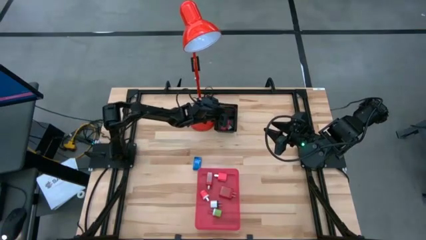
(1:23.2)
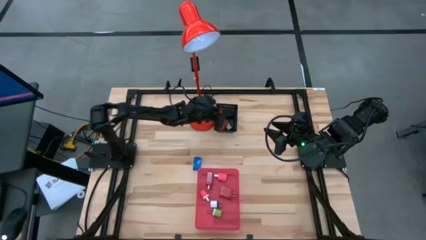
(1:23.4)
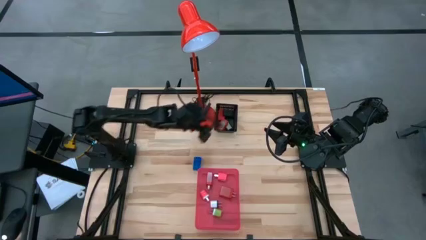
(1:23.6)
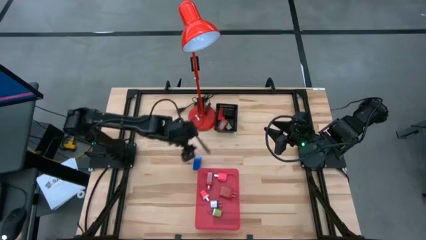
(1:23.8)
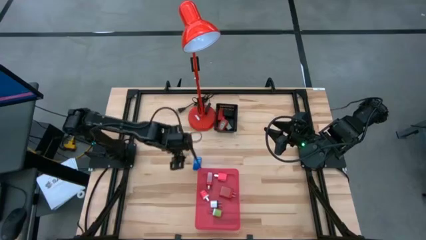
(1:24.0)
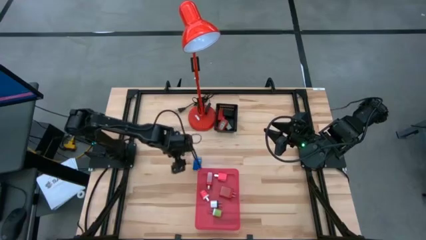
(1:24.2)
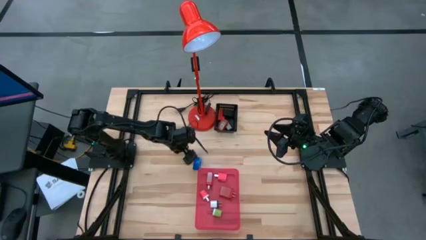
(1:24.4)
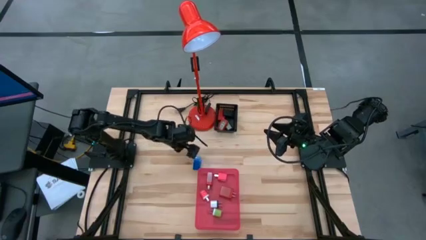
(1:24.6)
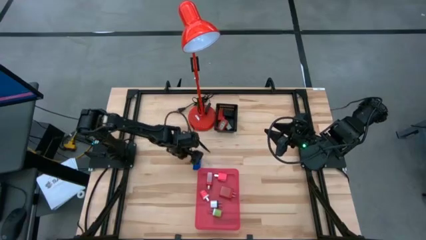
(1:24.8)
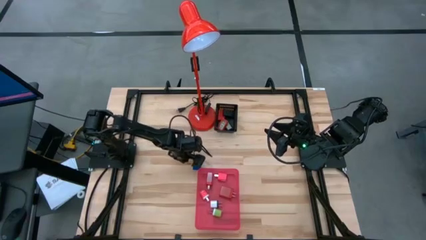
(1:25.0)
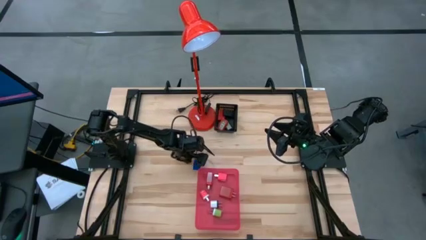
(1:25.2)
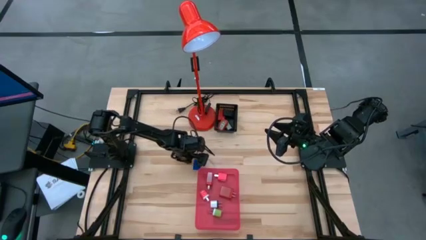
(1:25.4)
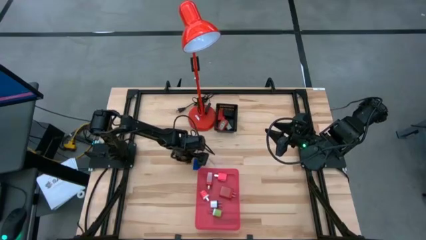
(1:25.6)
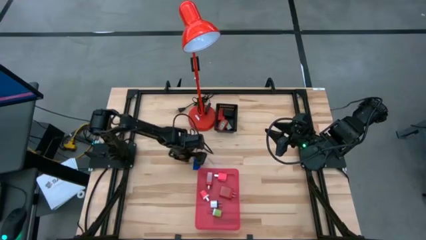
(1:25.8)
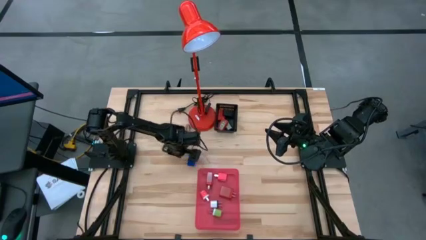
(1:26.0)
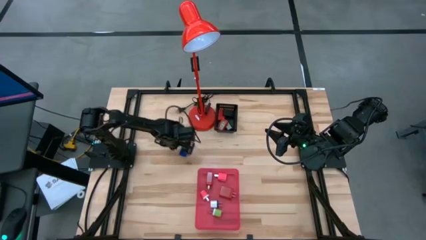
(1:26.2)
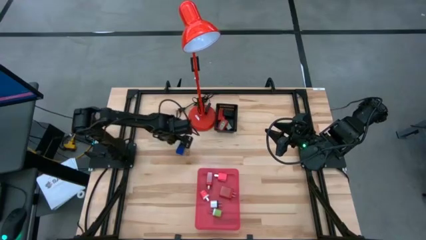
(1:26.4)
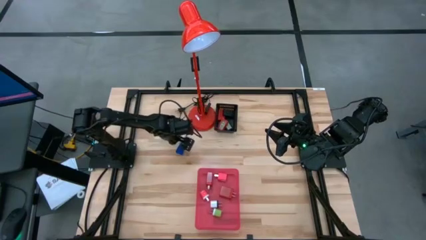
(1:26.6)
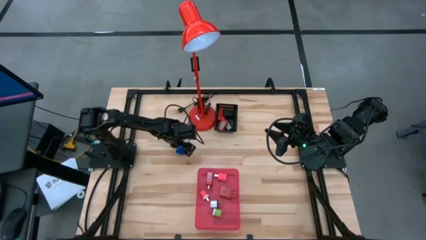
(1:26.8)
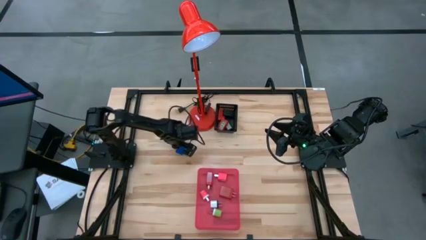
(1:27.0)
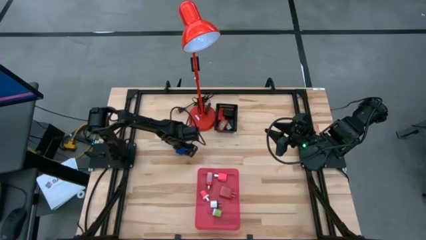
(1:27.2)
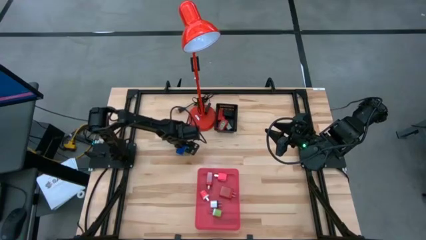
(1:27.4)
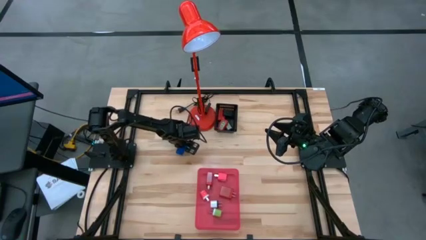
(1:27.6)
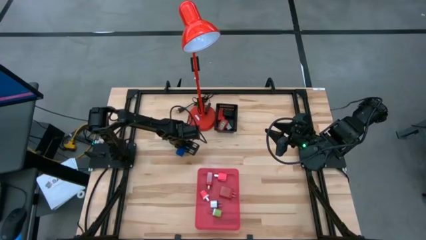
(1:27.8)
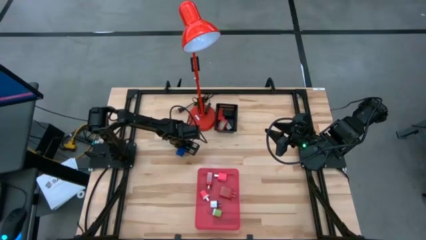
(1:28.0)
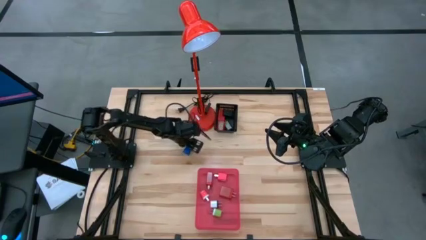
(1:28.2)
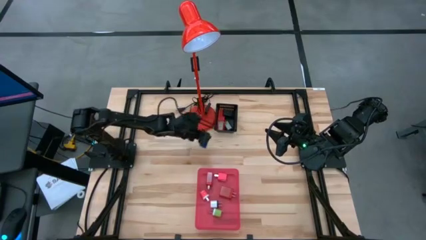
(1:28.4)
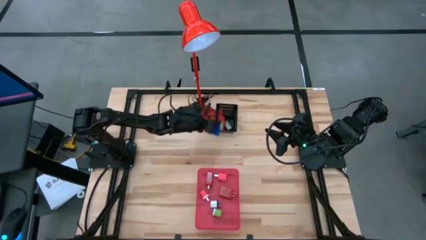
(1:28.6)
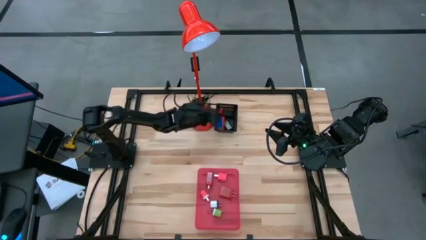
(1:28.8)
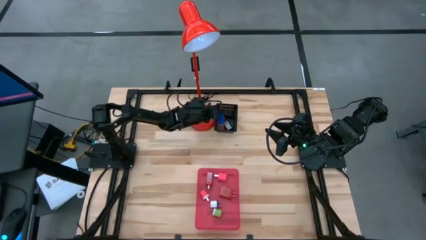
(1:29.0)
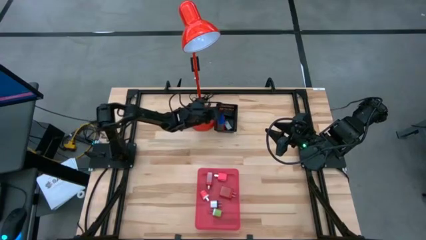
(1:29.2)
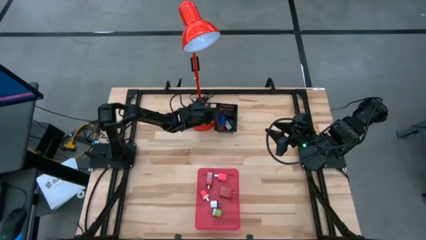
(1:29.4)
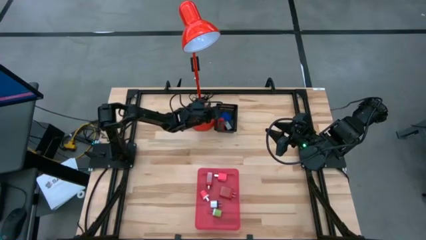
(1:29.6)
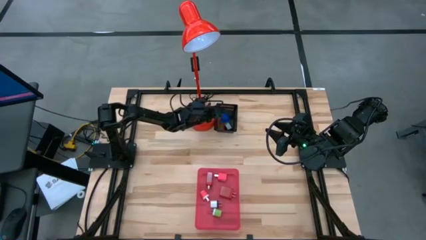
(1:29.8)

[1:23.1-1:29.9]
Task: Pick & Place Office items
Put the blue digital clock into the black bin

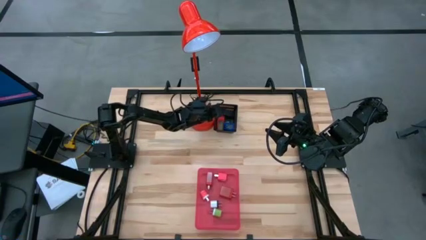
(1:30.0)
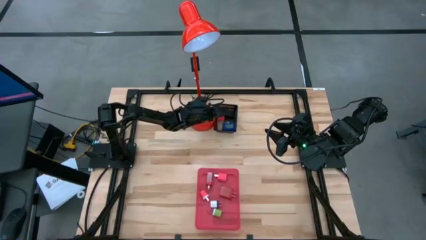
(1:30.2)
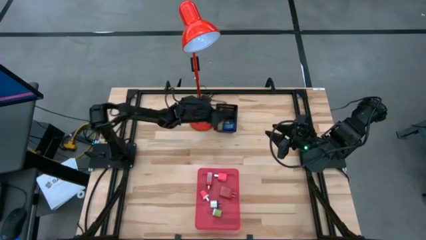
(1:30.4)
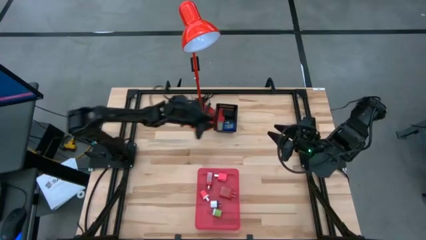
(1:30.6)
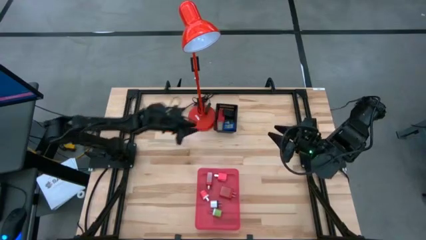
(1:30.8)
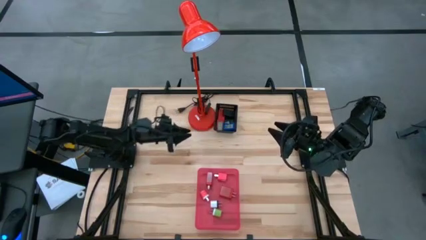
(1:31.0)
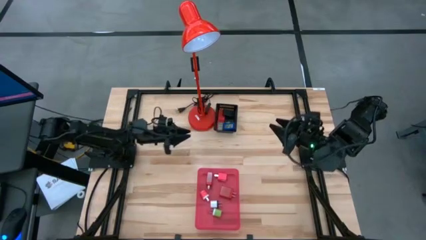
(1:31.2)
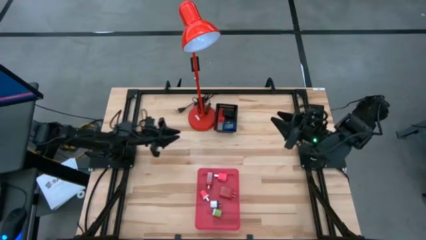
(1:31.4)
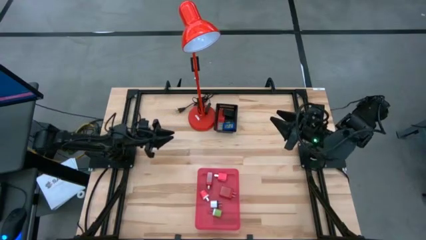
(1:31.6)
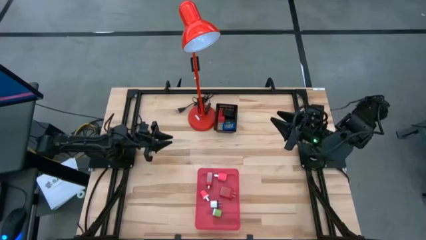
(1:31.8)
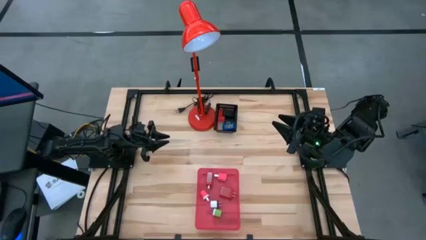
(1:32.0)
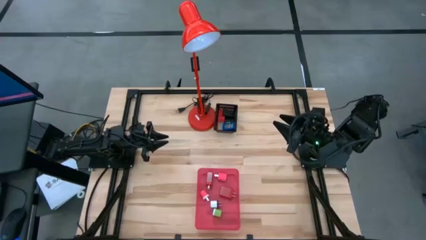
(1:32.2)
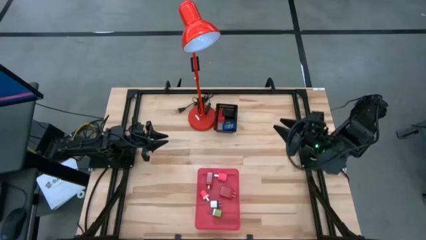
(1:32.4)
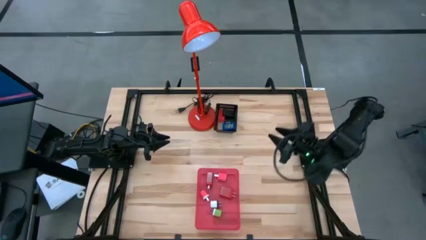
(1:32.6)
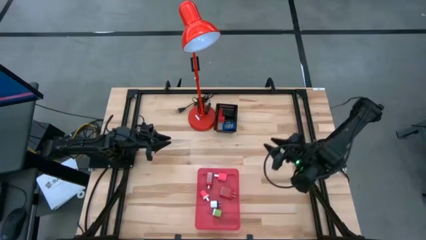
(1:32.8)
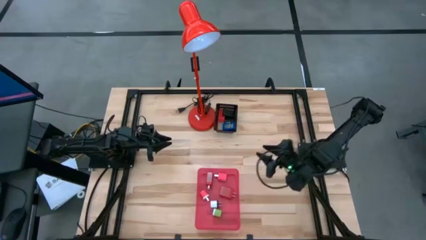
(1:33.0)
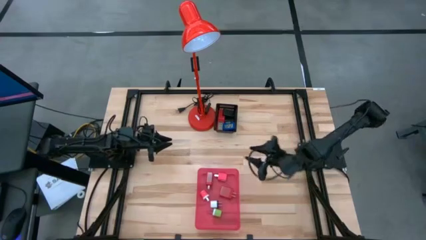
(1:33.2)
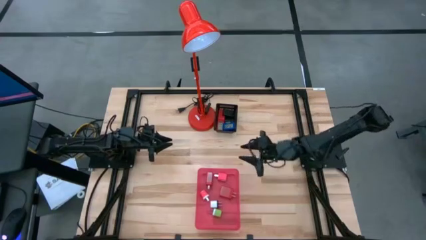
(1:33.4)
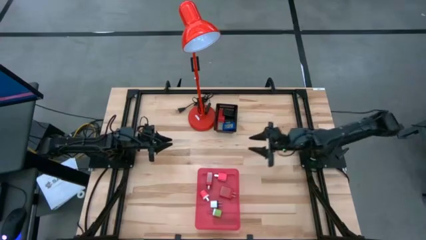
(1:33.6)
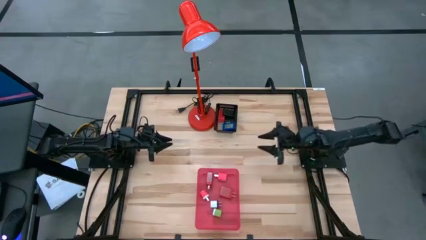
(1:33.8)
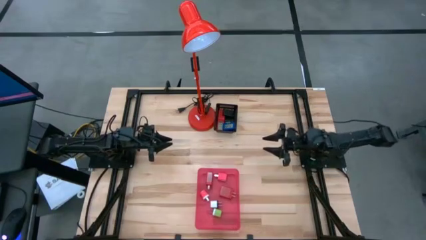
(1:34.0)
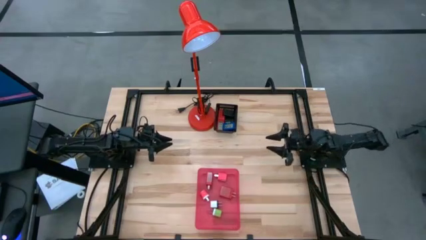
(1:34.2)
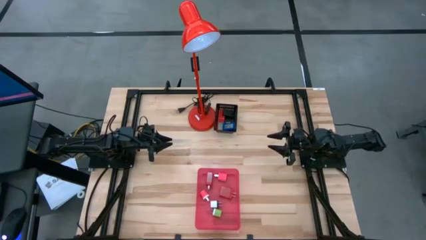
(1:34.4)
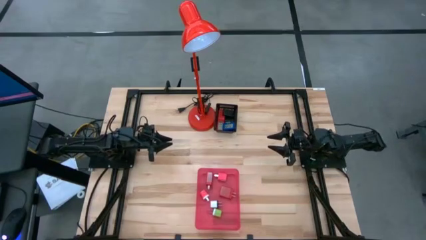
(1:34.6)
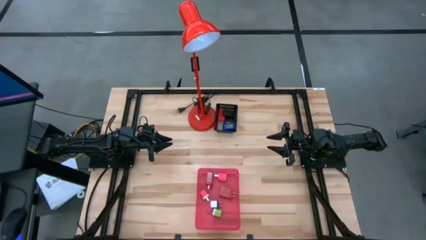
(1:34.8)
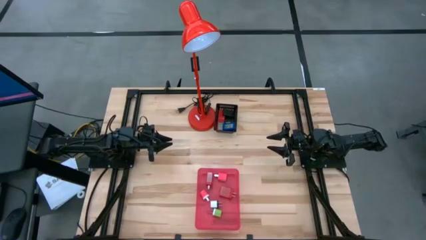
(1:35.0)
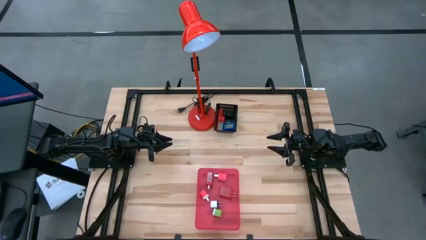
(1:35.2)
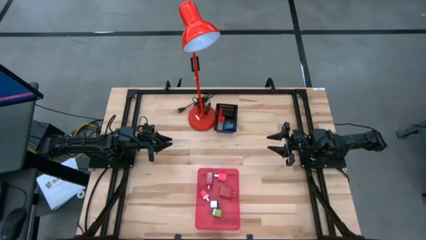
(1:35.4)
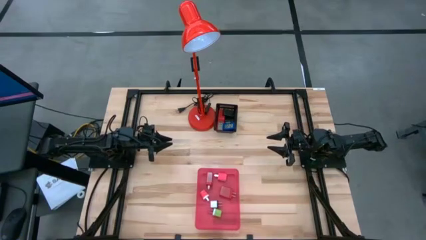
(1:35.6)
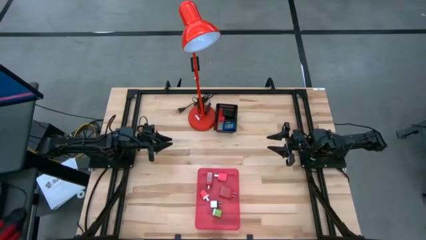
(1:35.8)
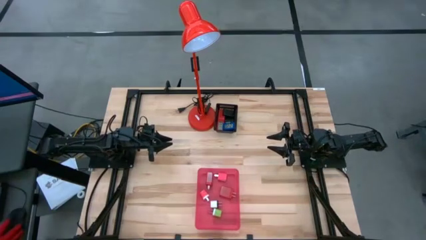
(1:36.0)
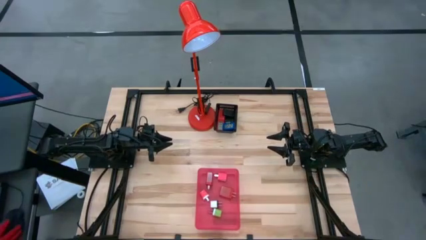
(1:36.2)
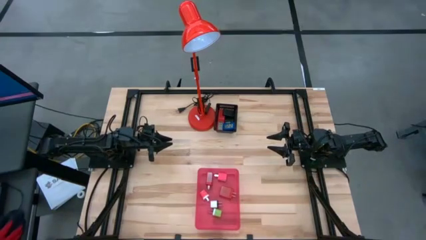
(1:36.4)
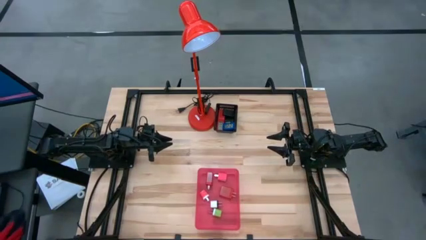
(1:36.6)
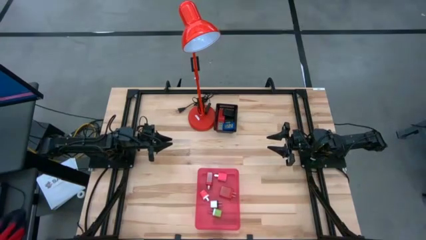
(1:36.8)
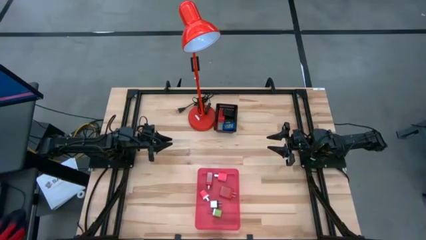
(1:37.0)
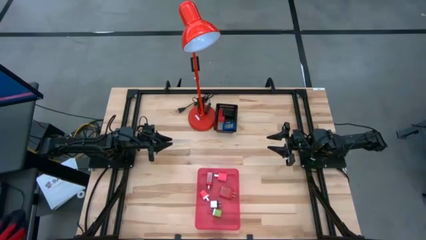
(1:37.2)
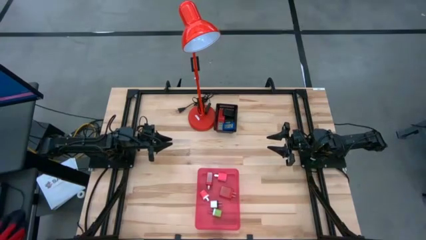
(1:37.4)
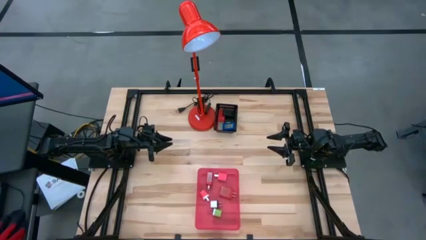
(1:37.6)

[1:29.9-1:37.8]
Return to Home Position
